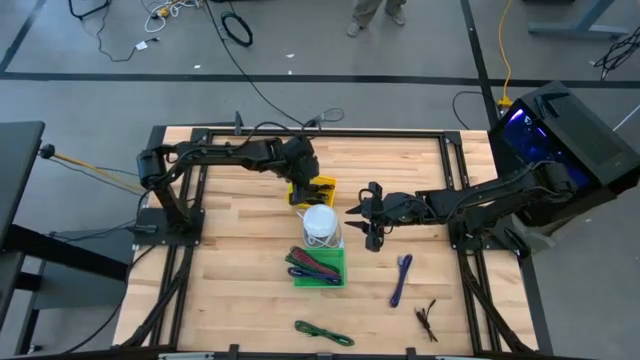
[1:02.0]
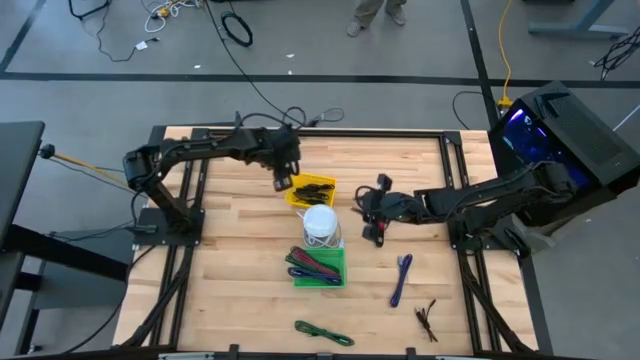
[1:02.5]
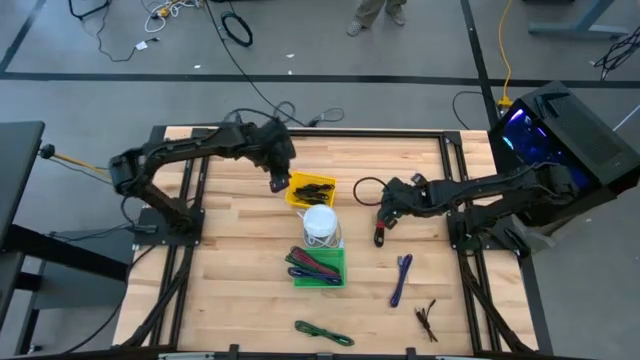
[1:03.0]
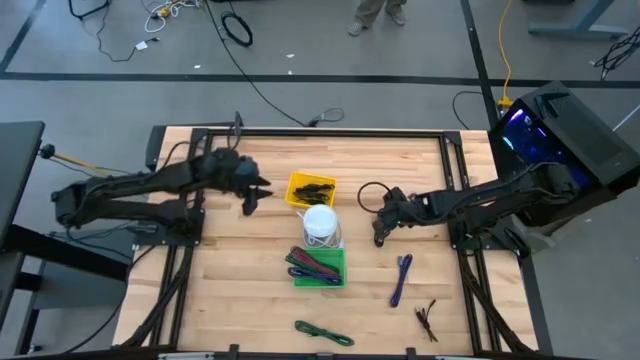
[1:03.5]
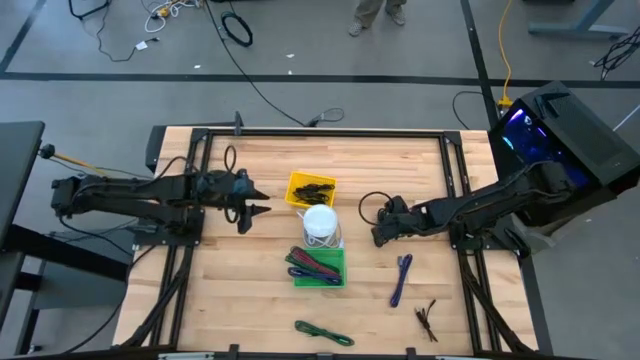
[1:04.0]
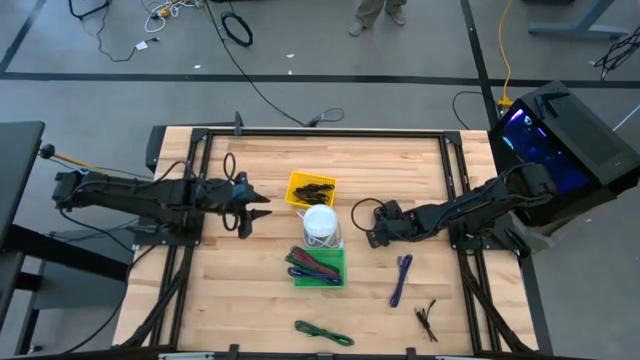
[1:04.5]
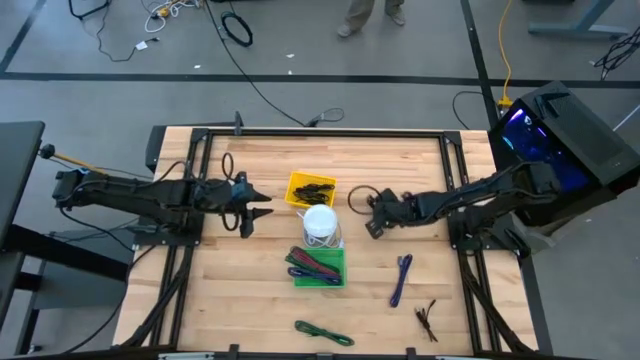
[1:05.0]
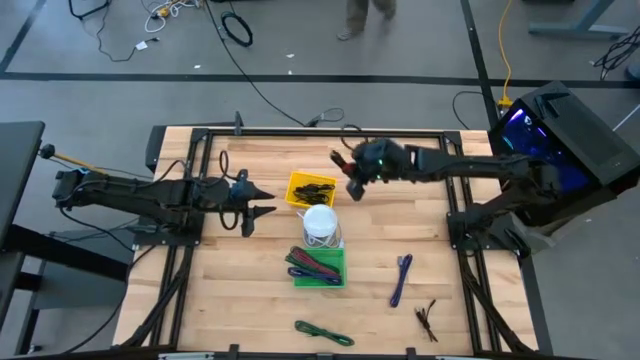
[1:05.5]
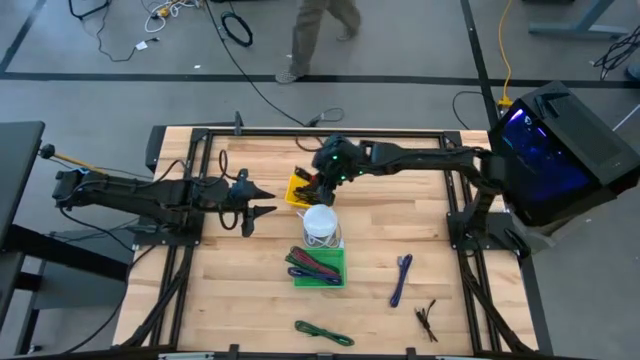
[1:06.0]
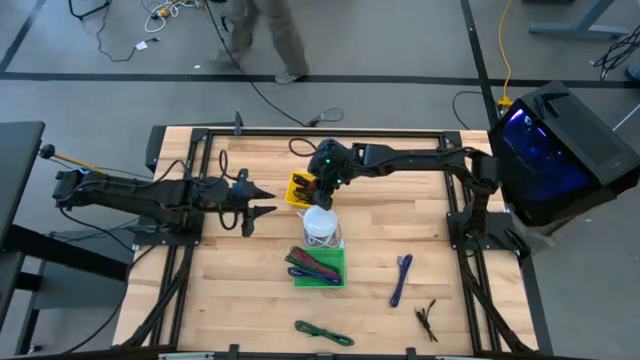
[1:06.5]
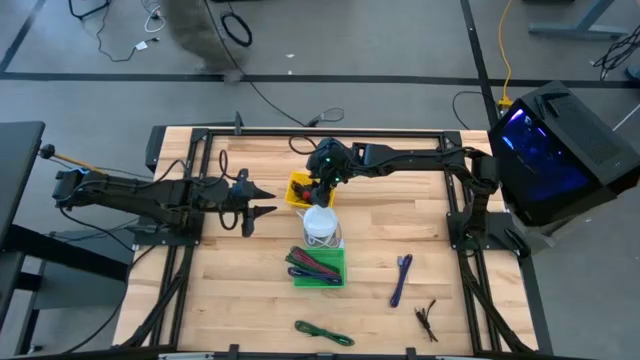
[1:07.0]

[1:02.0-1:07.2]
Task: Pick & Place USB Port
Put the black USB cable into the yellow bin

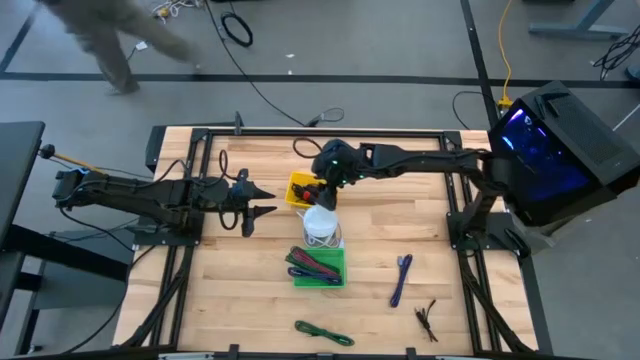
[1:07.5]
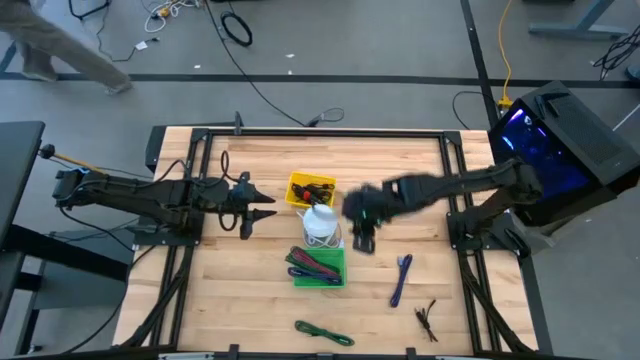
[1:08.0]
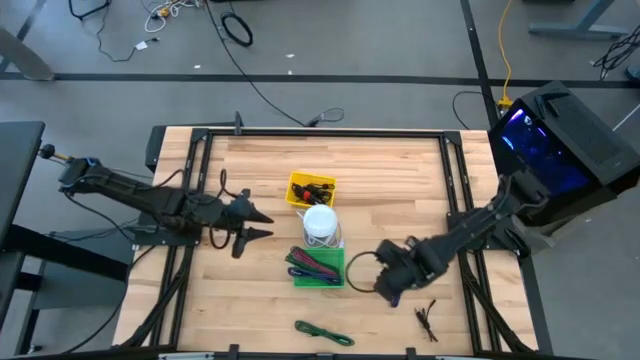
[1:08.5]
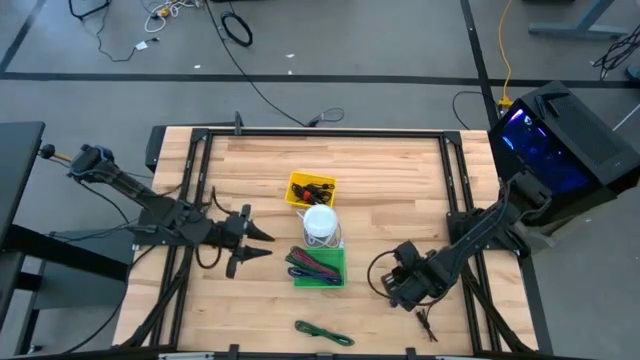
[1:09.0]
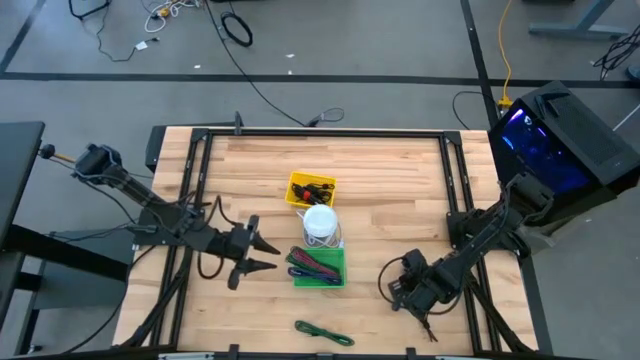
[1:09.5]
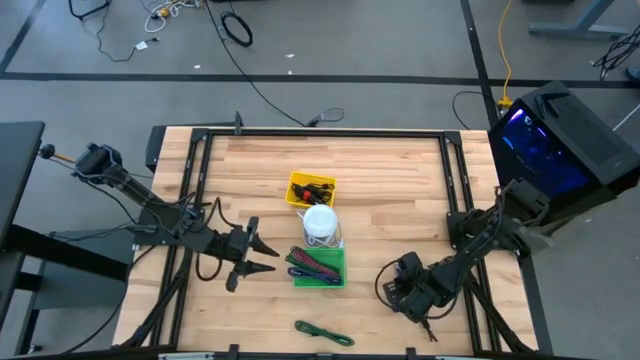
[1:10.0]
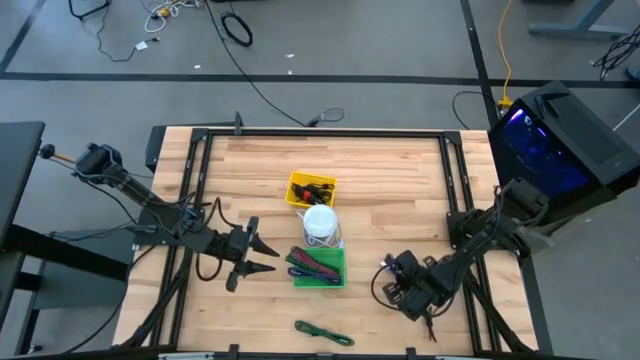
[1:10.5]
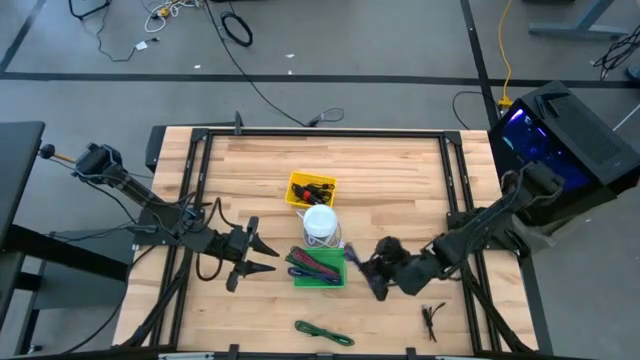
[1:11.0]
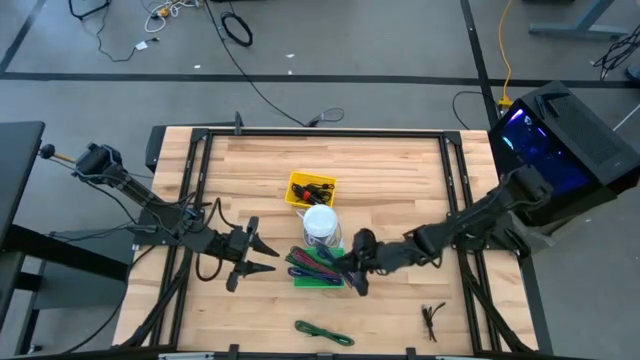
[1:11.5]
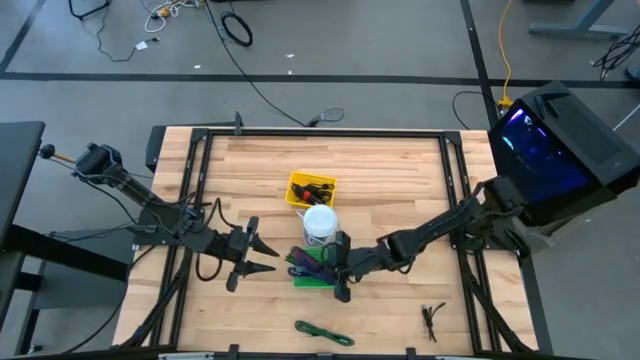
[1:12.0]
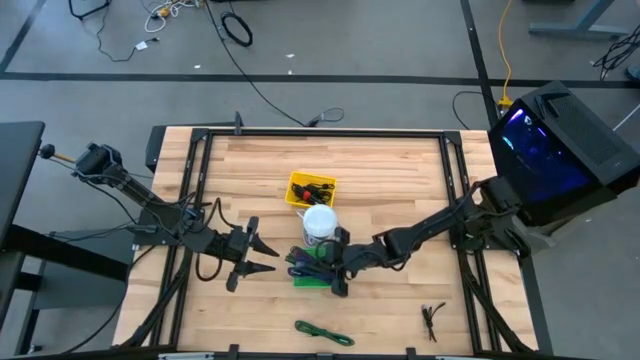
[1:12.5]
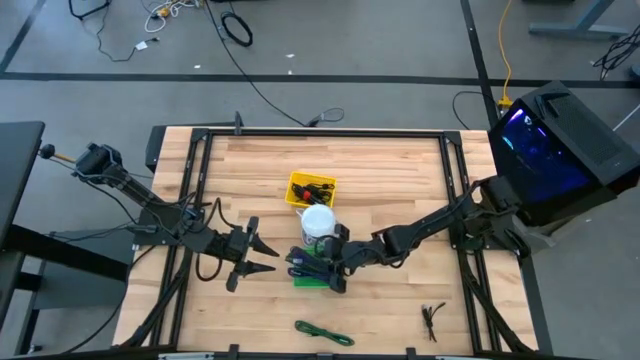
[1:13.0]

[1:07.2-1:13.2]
Put the violet and black USB cable into the green bin

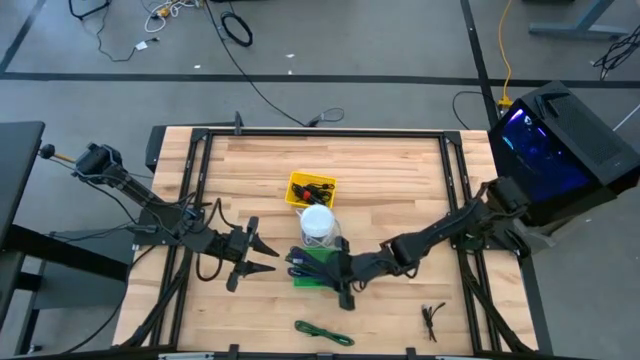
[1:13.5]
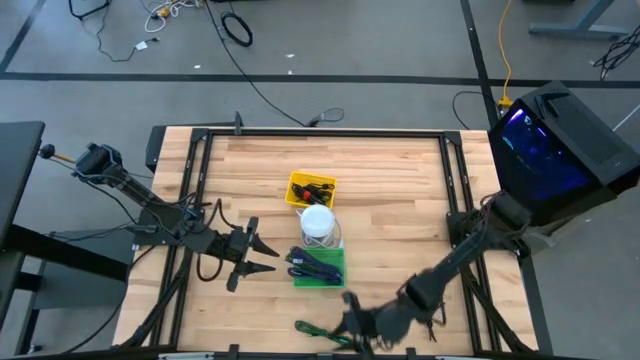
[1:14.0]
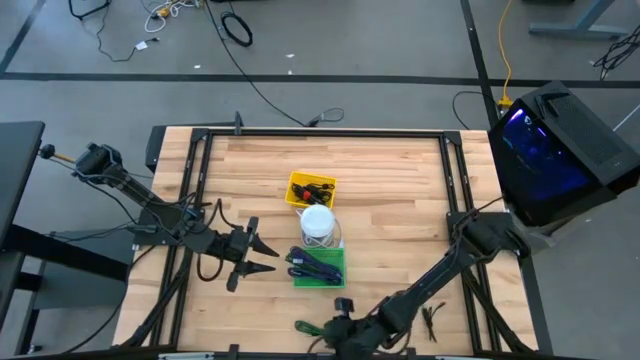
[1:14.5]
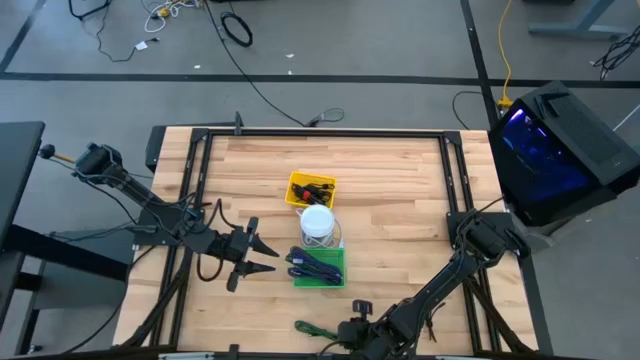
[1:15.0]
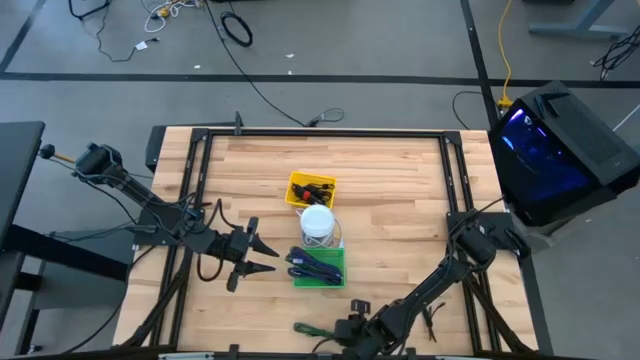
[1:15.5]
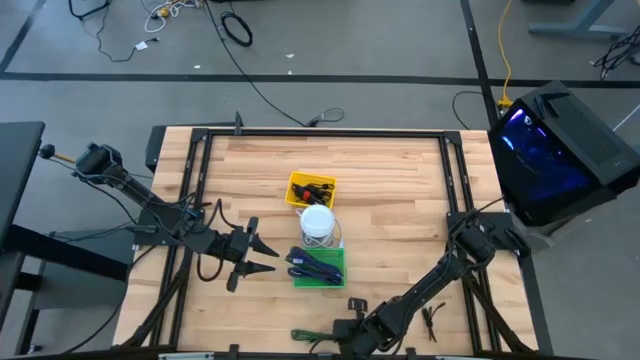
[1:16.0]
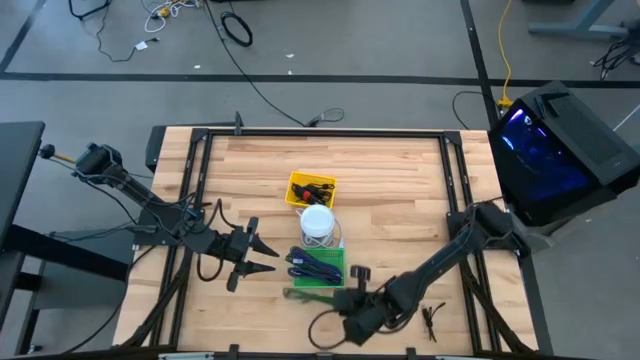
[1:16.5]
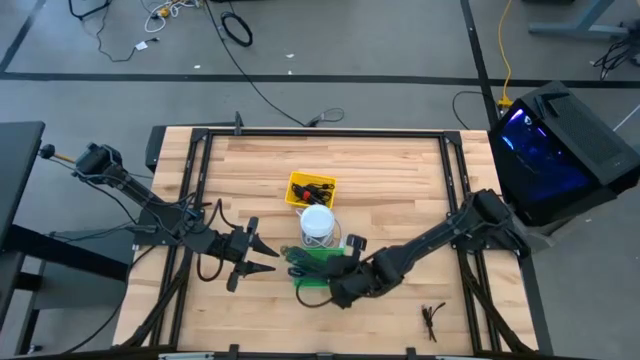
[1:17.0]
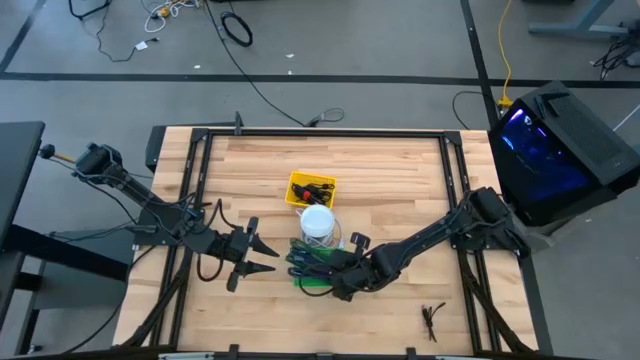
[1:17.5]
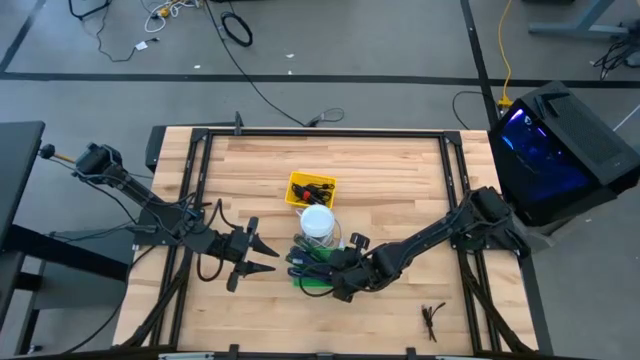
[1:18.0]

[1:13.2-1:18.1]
Put the green and black USB cable into the green bin

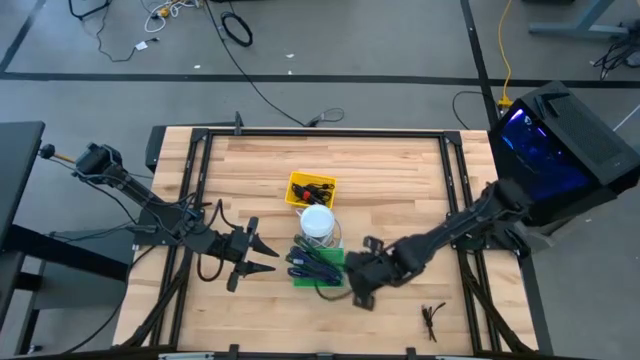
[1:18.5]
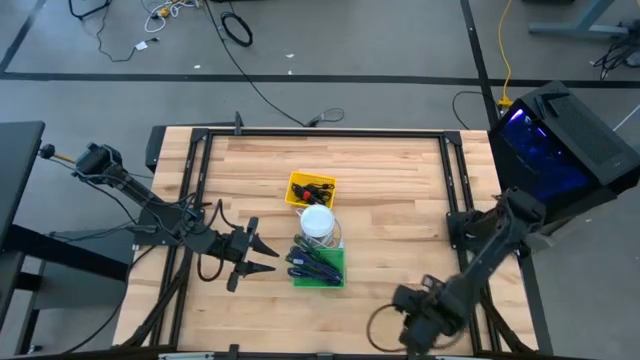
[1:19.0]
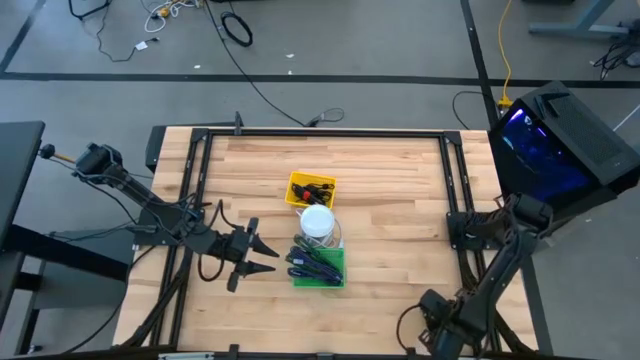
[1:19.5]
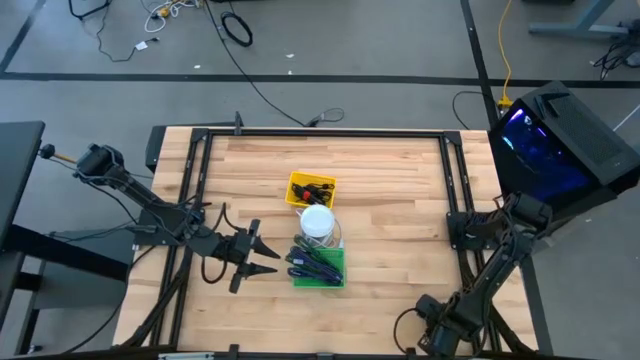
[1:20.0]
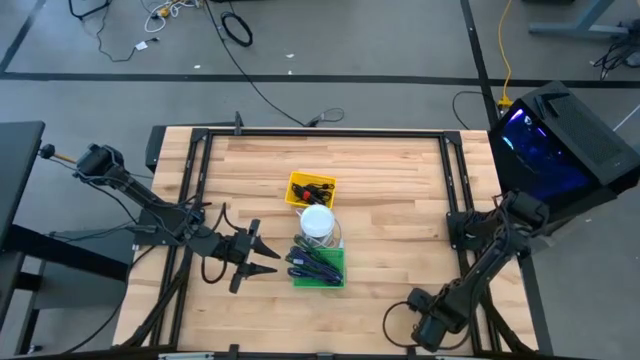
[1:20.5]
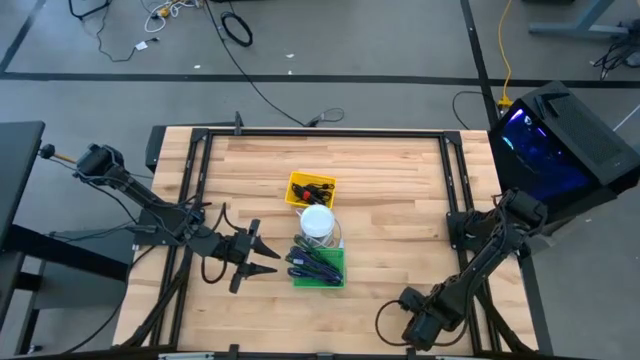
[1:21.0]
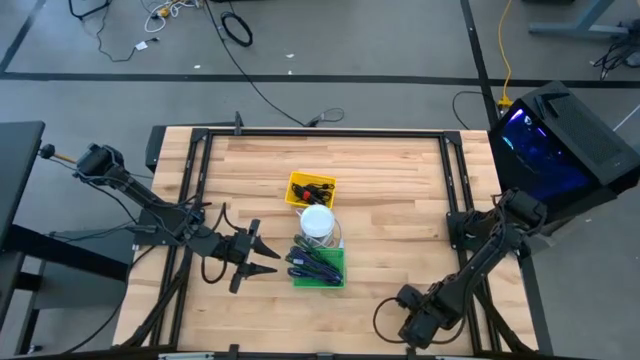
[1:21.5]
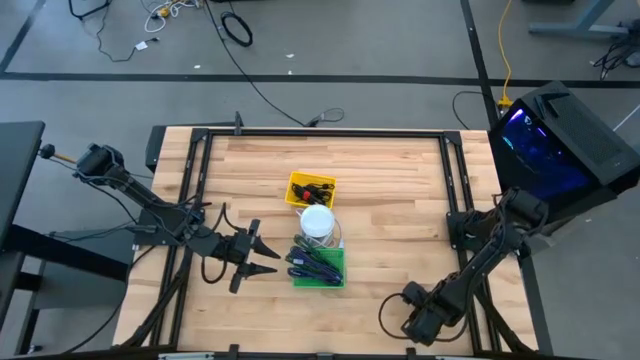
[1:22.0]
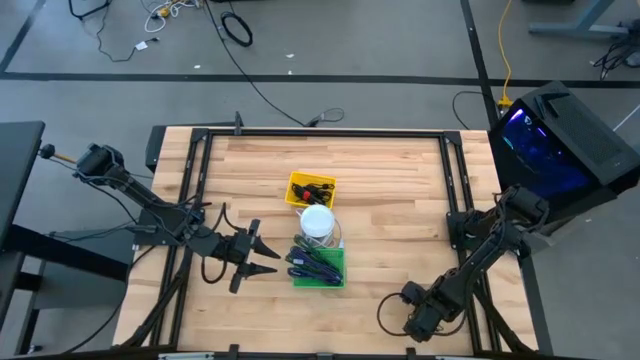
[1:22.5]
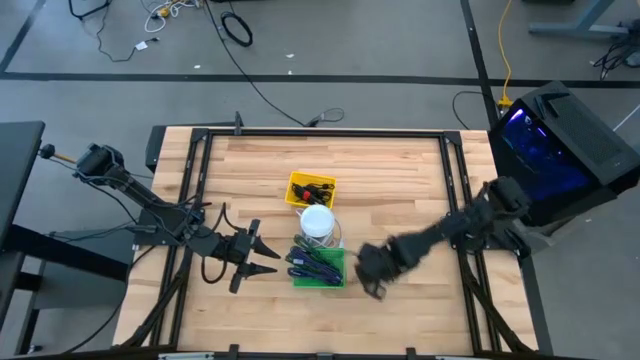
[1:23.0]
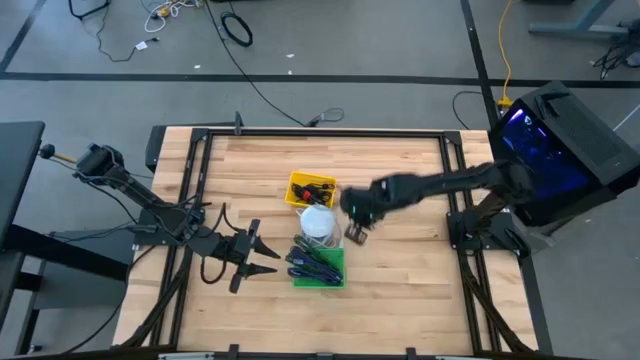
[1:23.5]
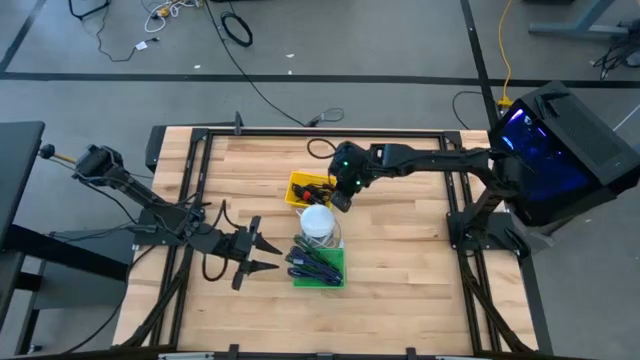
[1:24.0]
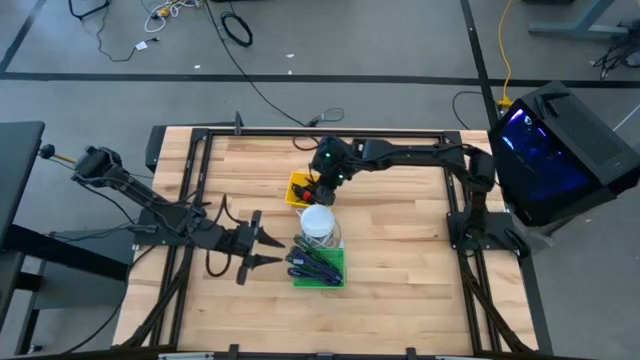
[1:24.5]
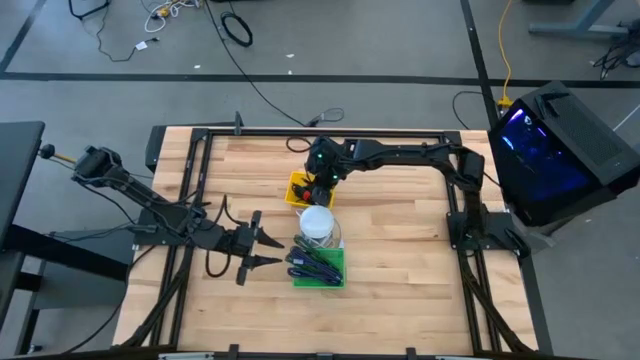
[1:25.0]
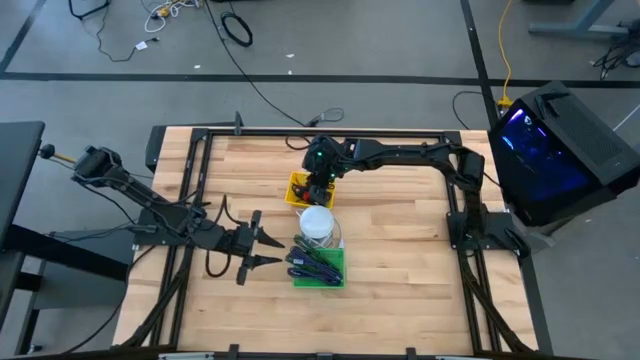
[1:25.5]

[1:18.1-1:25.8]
Put the black USB cable into the yellow bin
